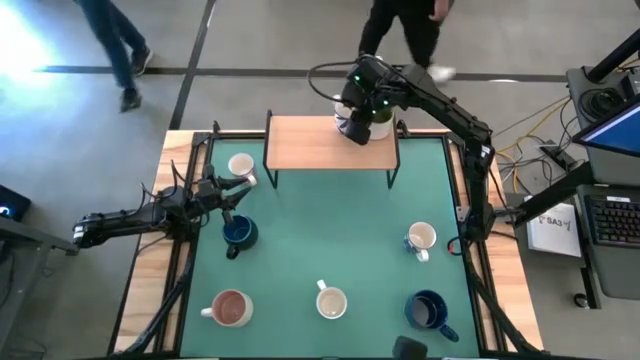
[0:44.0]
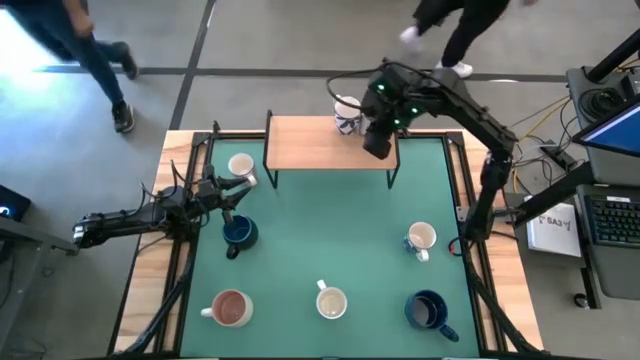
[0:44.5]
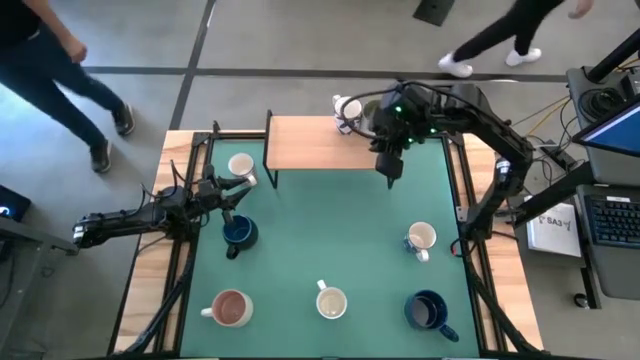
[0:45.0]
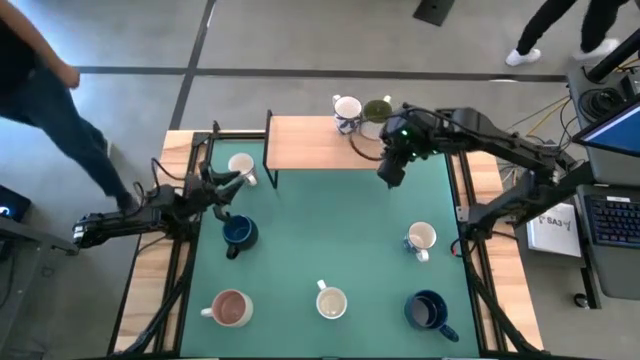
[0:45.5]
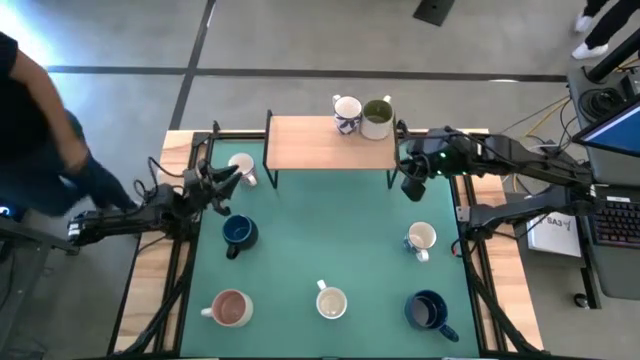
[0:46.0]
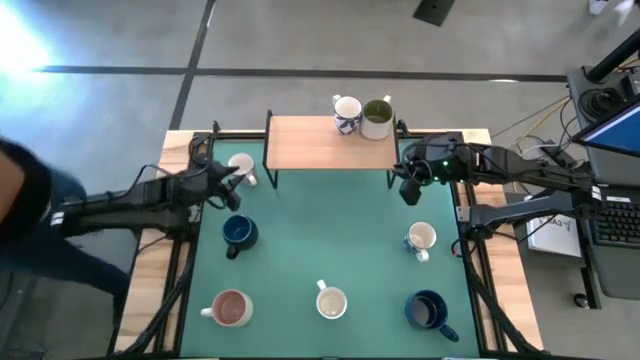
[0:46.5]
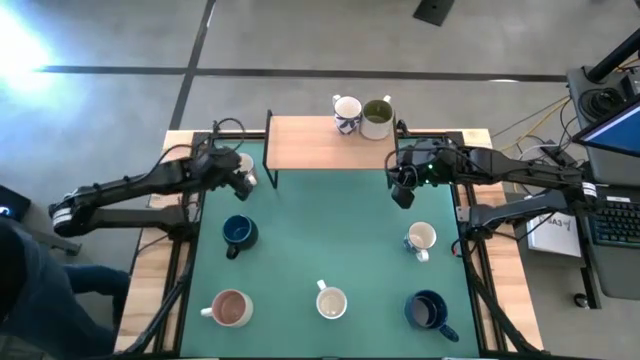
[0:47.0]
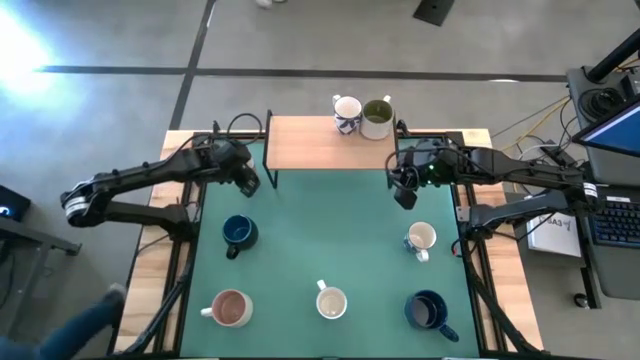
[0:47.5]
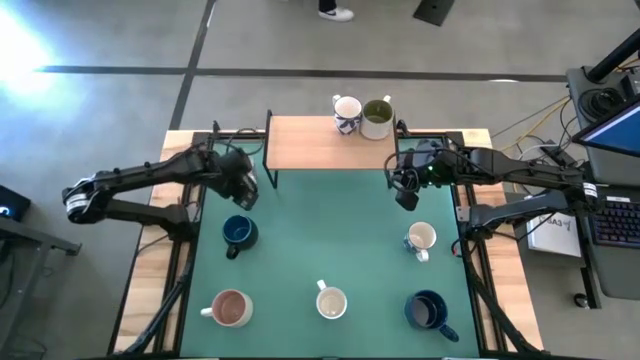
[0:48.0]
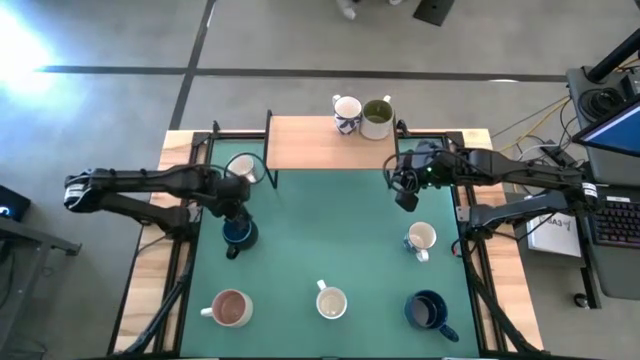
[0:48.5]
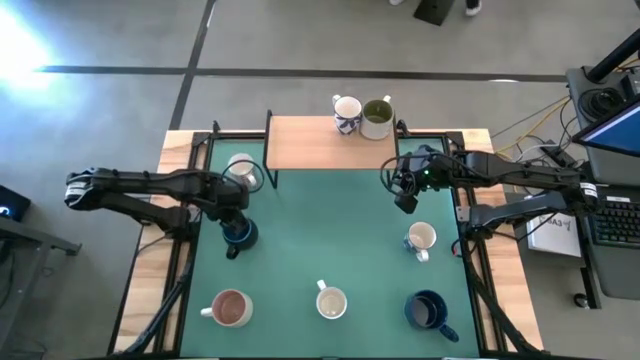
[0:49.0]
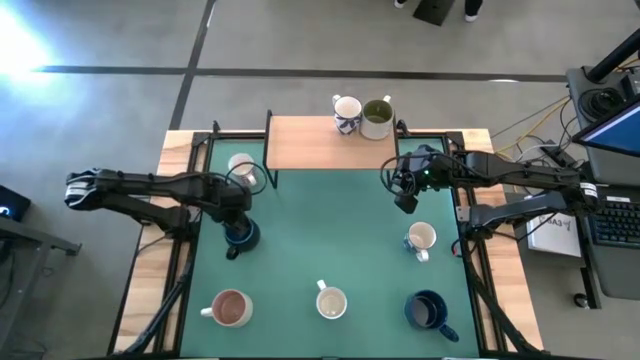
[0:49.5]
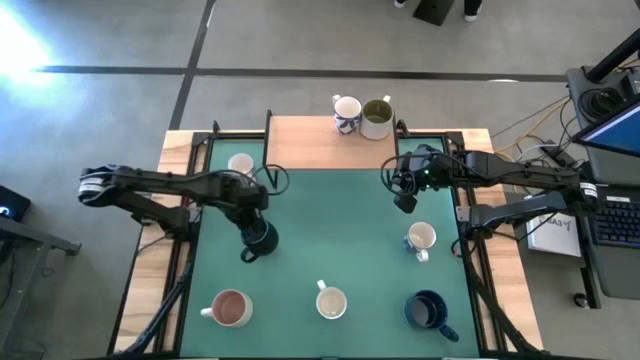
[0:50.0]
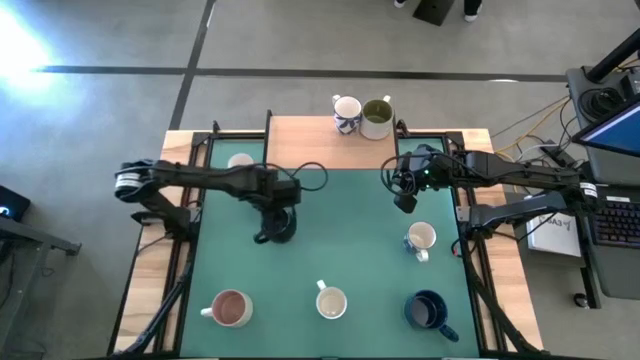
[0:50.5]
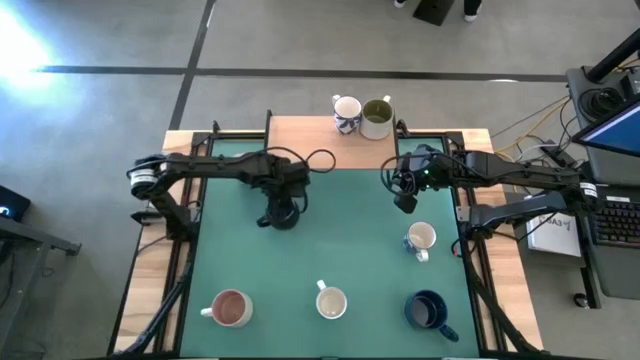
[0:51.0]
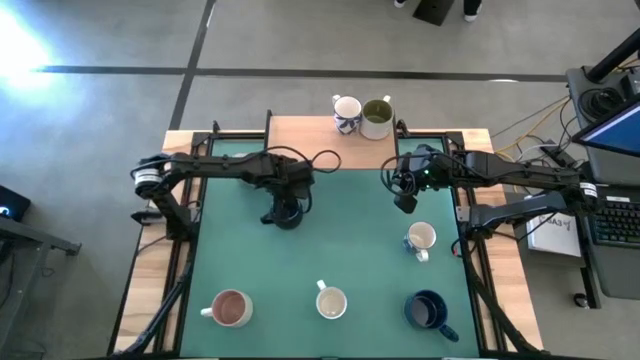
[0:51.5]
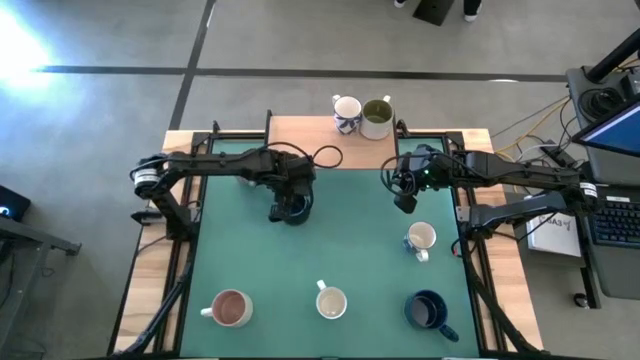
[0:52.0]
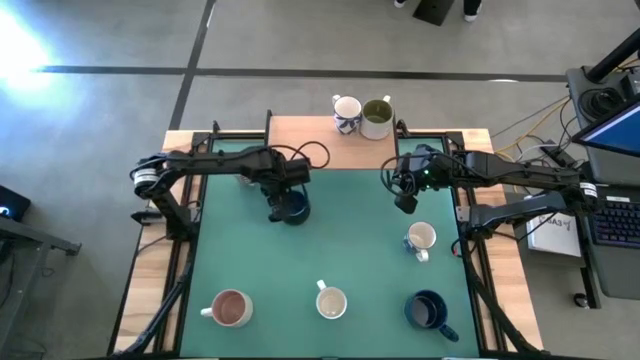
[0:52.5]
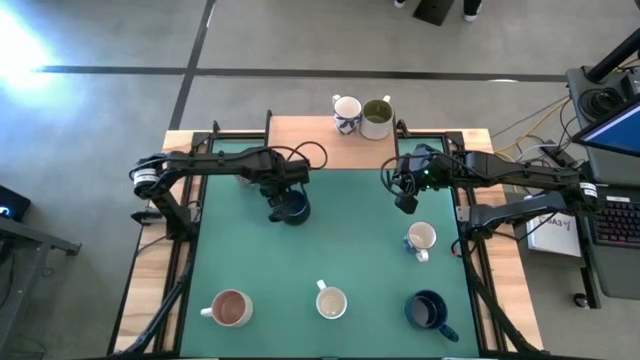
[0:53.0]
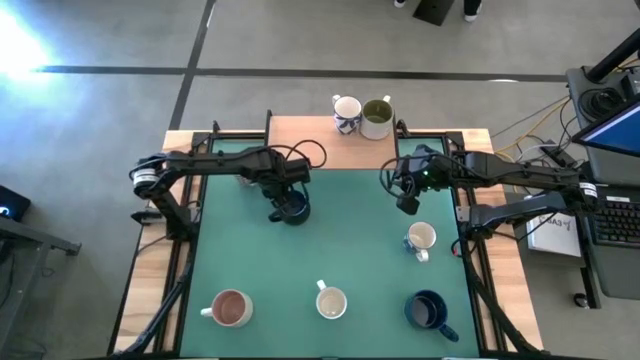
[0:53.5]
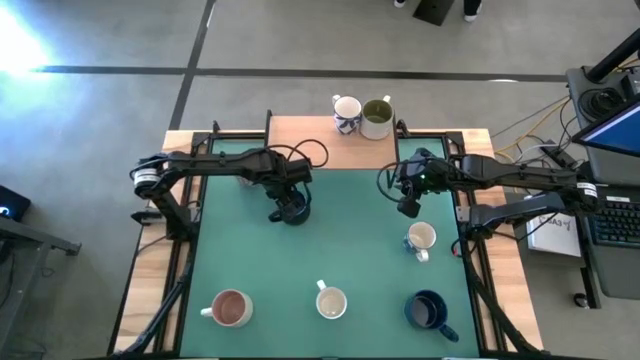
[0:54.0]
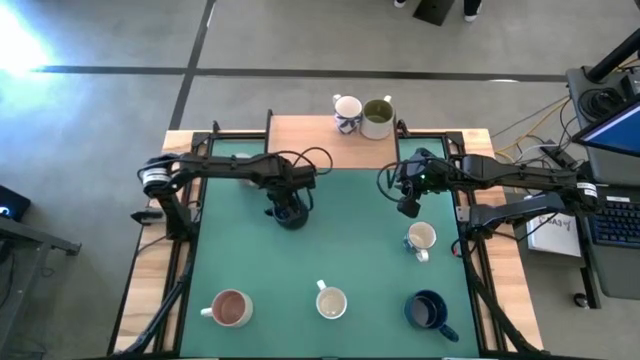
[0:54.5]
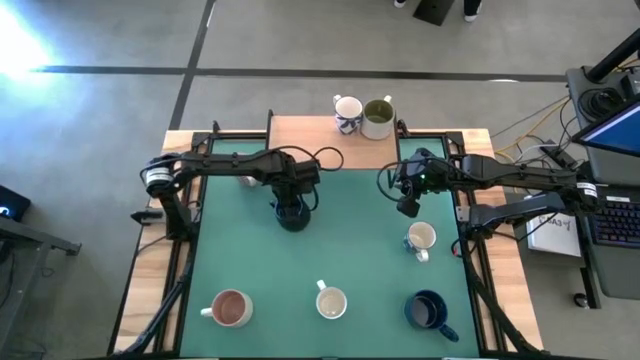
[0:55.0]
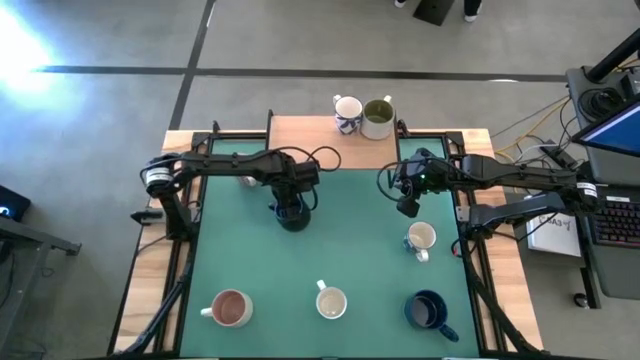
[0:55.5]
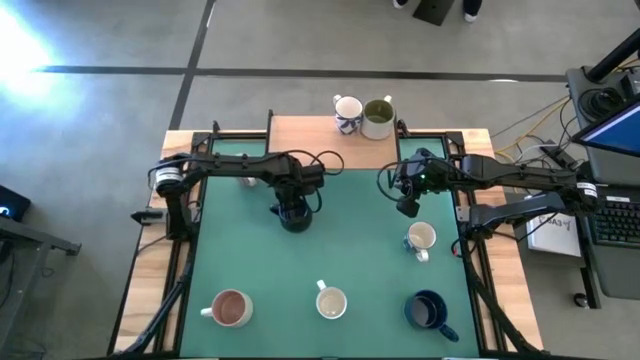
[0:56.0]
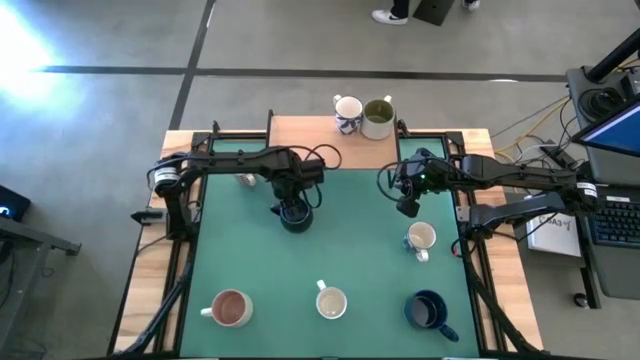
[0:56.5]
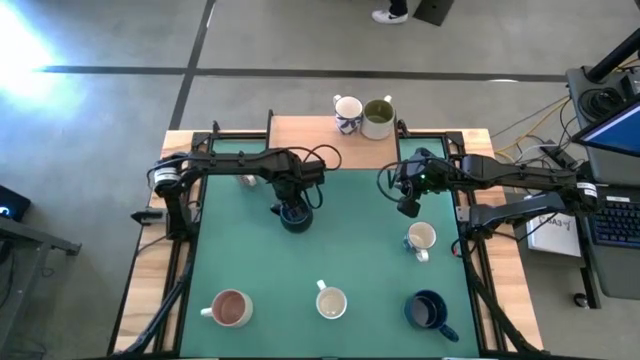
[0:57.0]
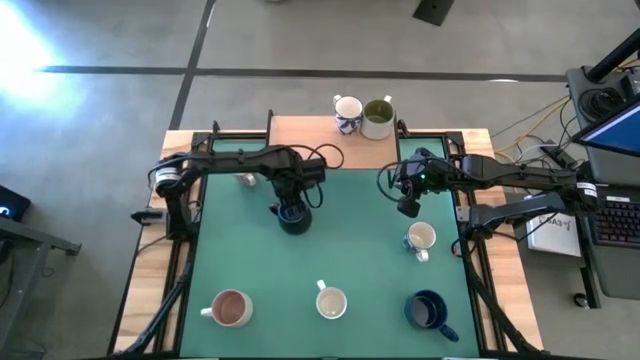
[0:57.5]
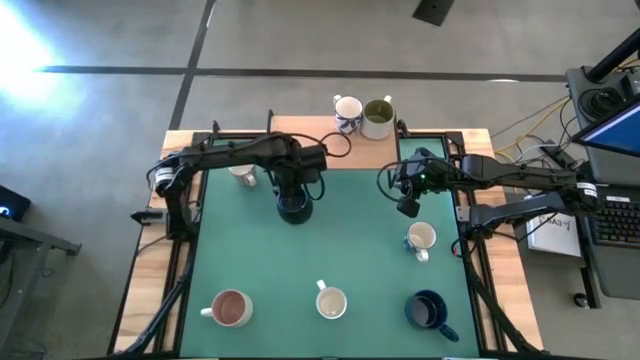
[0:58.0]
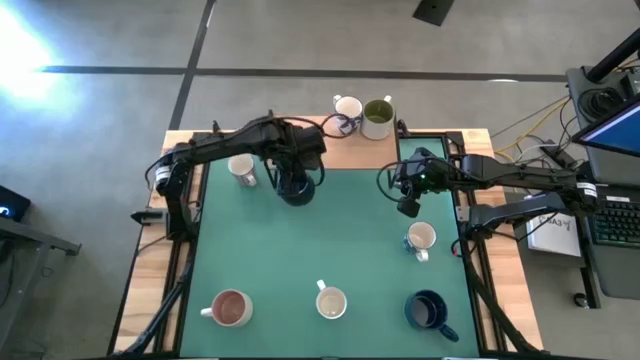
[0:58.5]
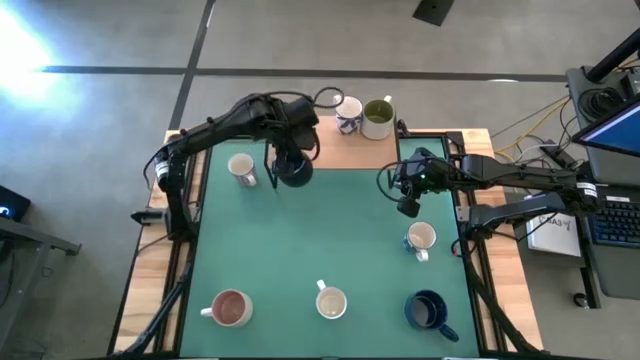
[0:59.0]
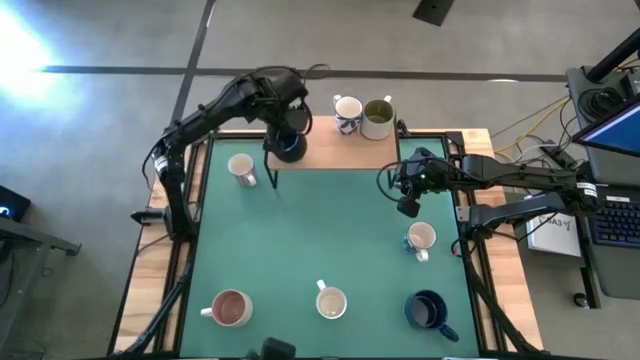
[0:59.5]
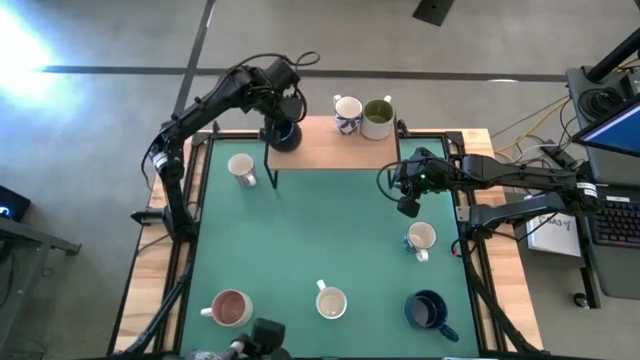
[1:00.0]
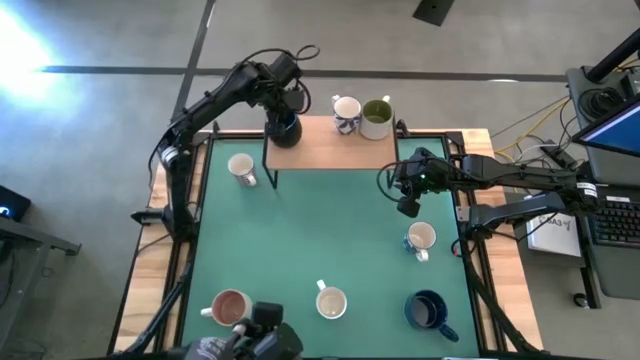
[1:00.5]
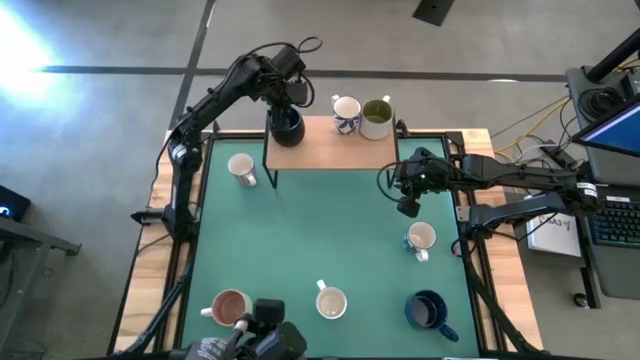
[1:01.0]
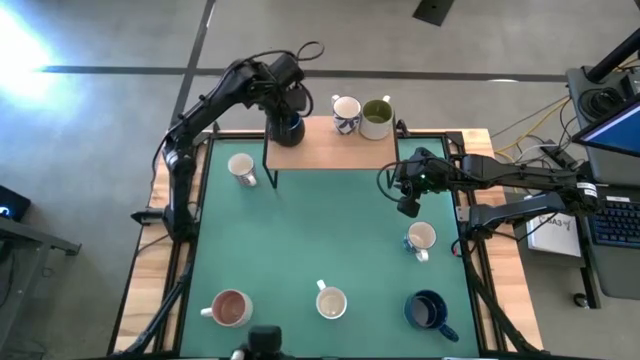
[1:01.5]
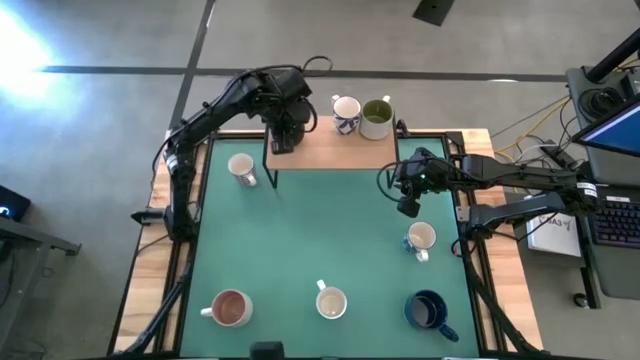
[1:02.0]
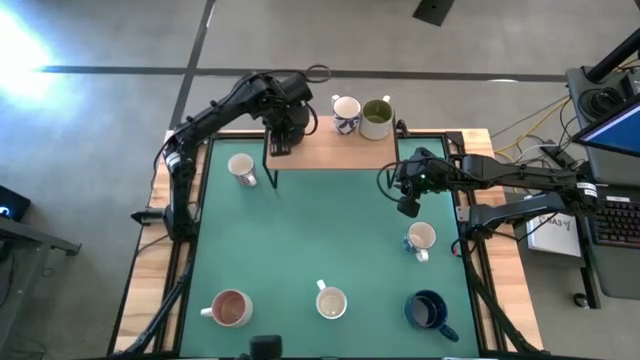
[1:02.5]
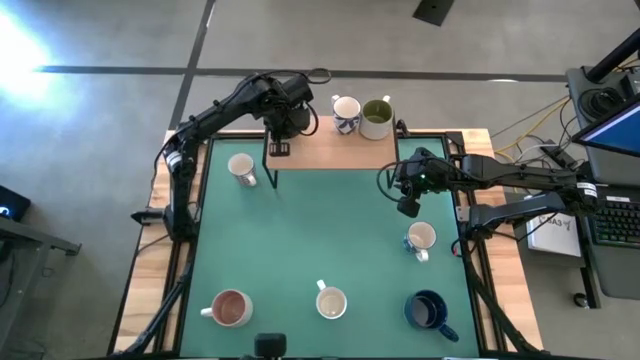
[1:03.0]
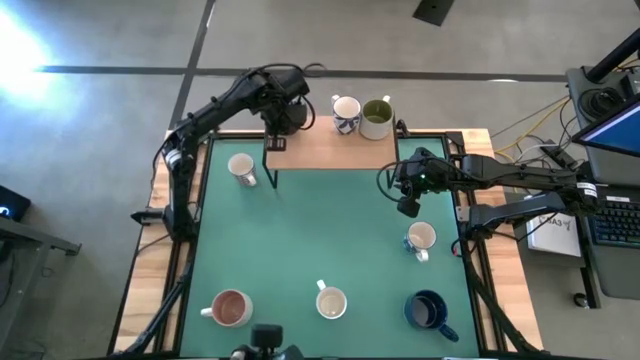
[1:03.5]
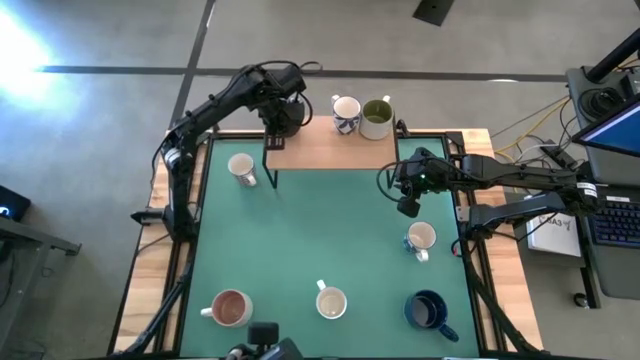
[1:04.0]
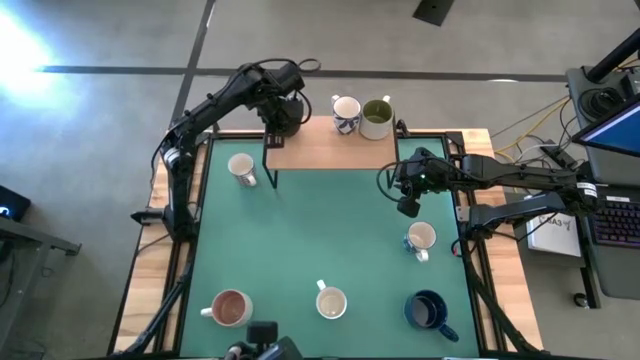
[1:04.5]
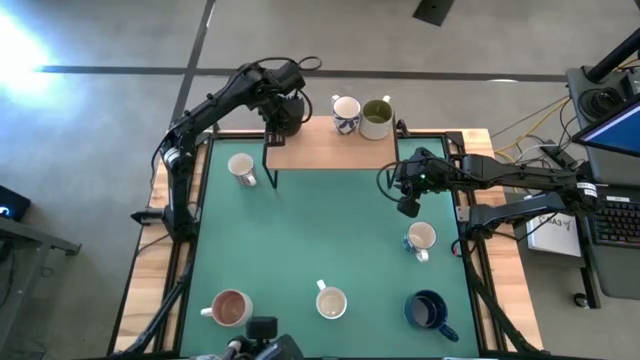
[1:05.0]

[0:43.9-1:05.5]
Task: Place coffee mugs
Put the dark blue mug on the shelf
